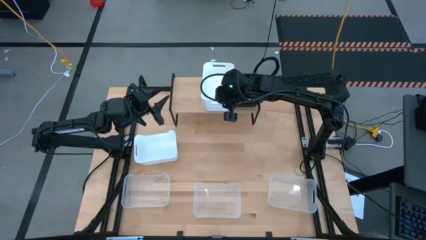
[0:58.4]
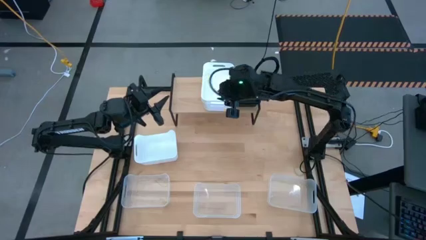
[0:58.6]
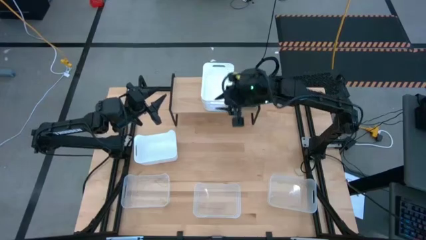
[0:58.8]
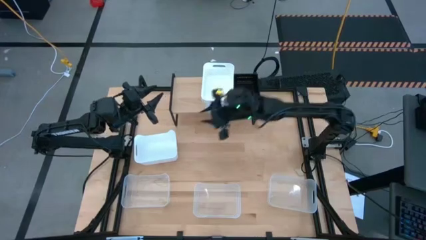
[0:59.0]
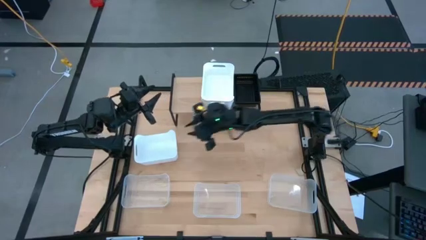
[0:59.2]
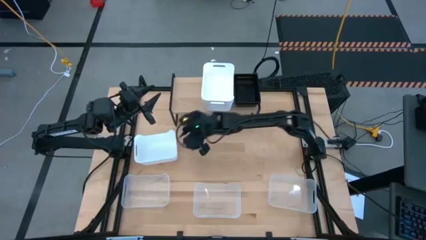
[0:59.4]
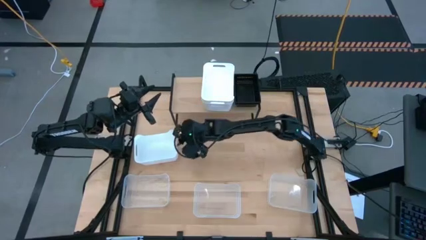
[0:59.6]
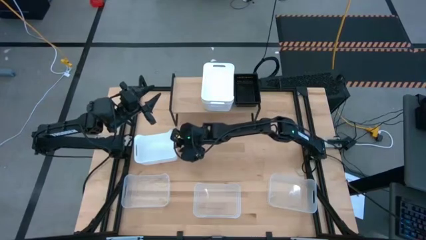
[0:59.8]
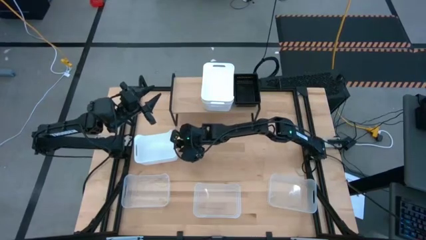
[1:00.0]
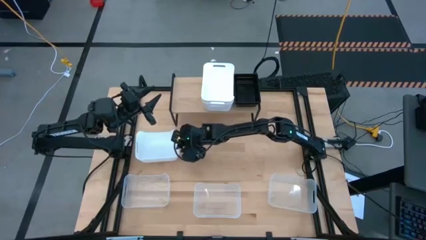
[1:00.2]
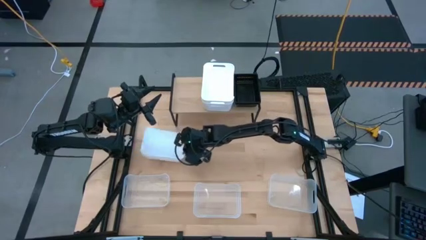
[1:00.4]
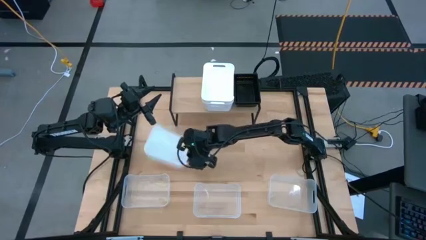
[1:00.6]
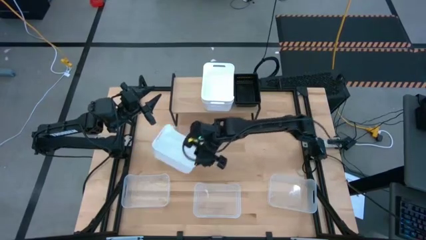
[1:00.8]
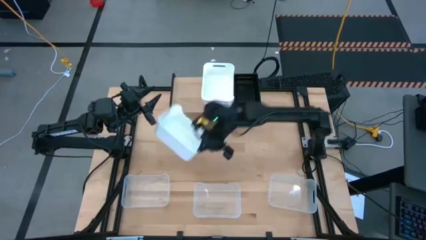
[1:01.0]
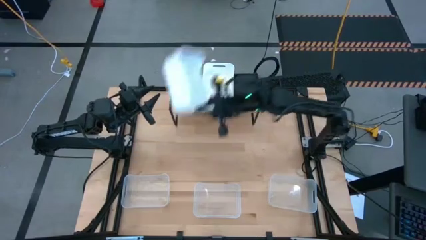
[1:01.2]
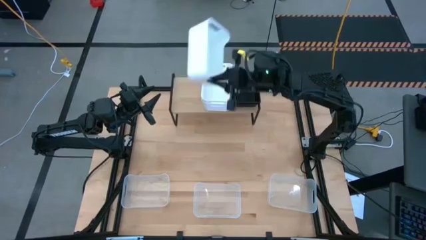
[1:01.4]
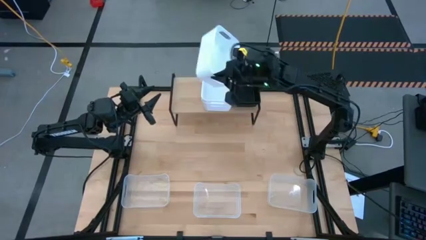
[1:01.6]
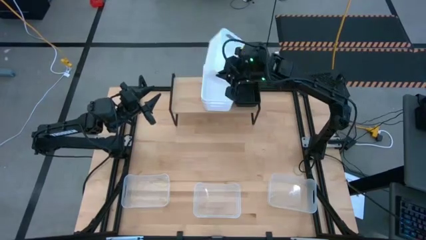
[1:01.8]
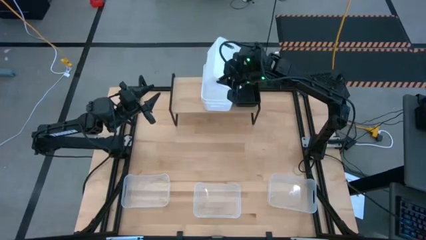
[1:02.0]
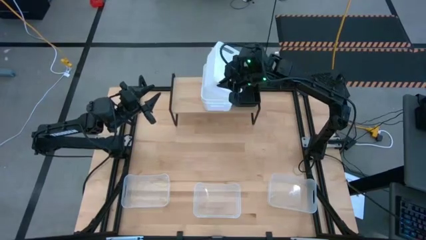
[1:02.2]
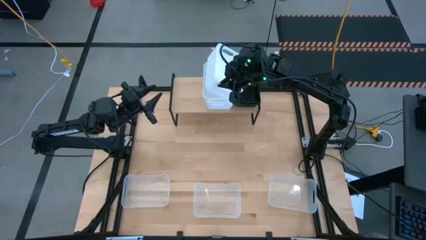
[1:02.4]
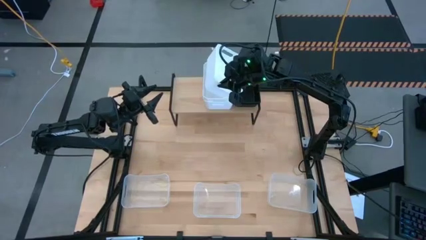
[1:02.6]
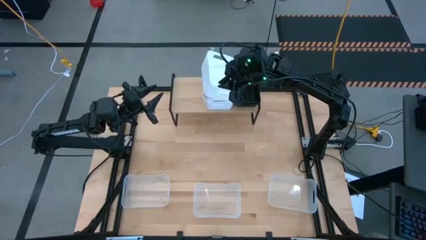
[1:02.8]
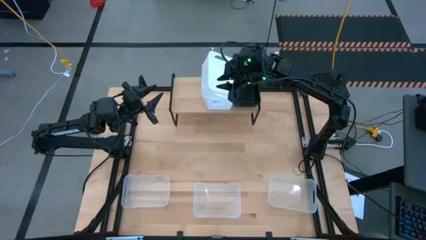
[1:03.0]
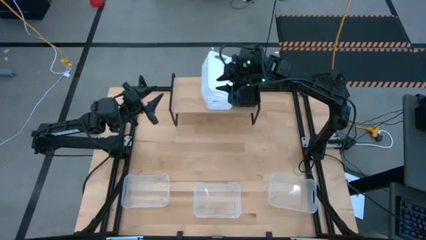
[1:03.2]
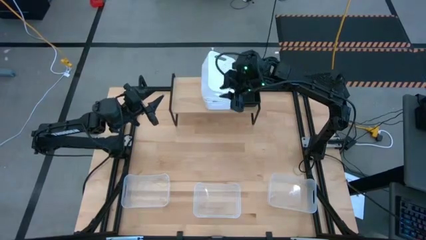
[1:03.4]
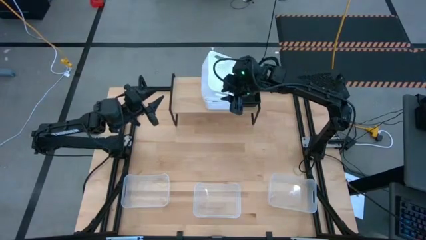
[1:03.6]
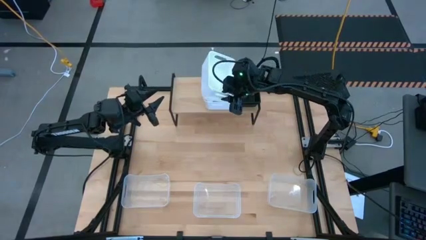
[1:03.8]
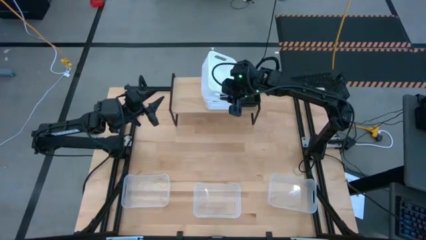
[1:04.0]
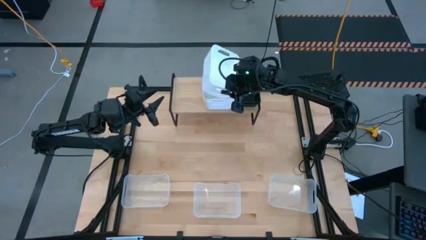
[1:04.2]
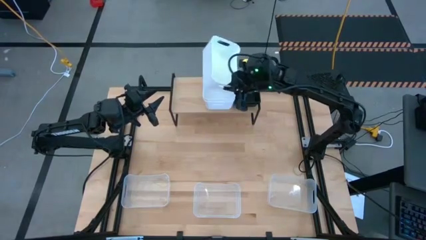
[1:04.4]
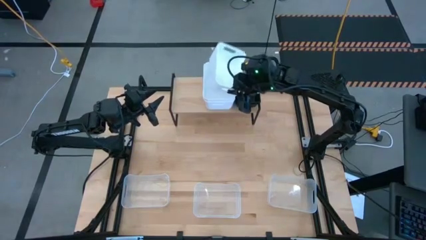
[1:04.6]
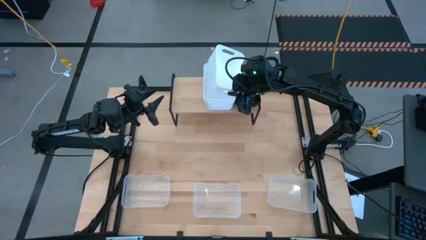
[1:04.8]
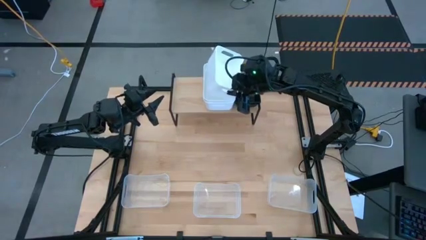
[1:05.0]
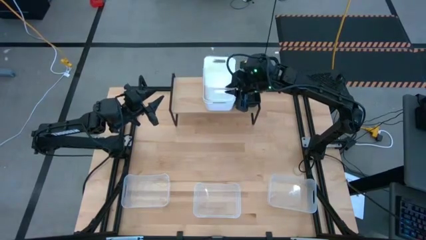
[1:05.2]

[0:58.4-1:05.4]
Task: Stack baskets on shelf by color
Stack the white bin on top of the stacked white bins on the shelf

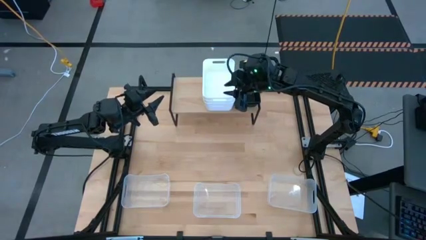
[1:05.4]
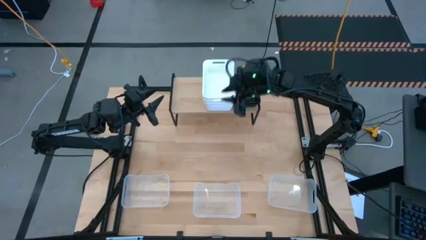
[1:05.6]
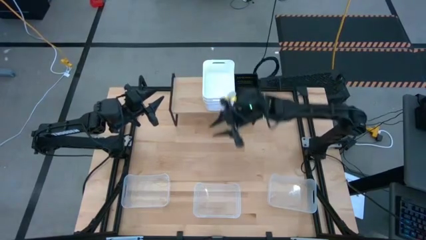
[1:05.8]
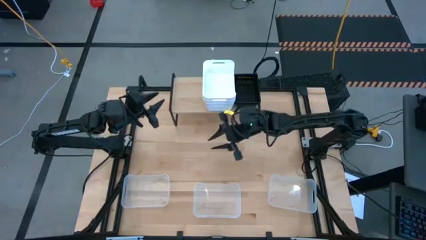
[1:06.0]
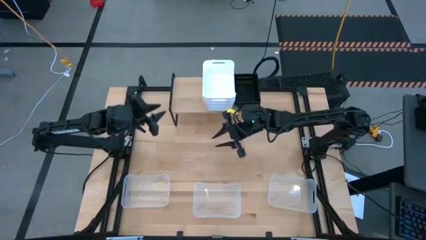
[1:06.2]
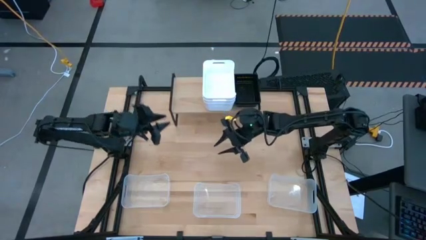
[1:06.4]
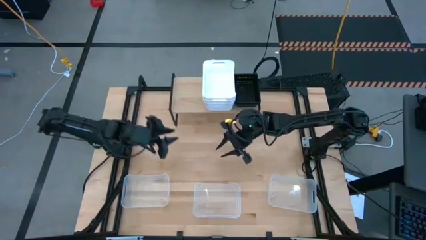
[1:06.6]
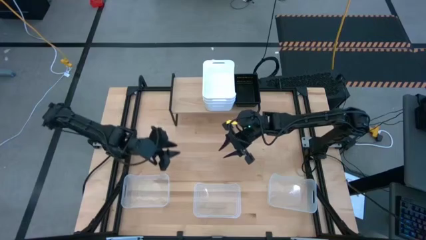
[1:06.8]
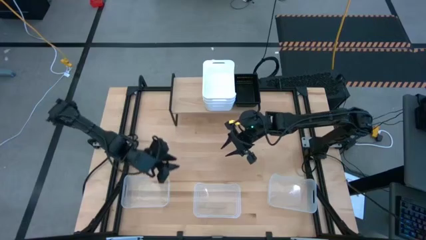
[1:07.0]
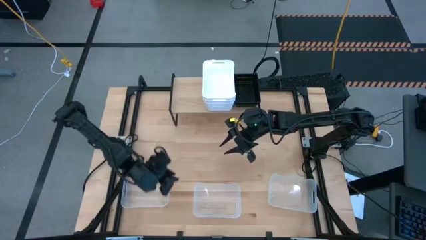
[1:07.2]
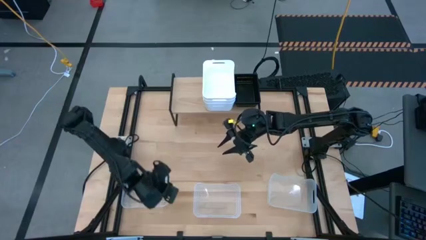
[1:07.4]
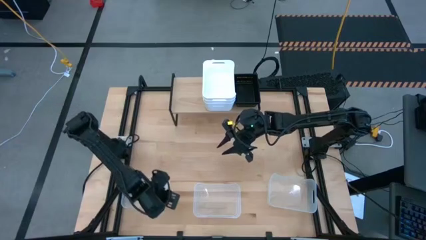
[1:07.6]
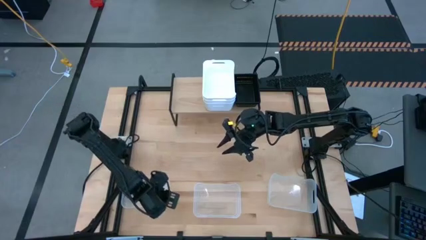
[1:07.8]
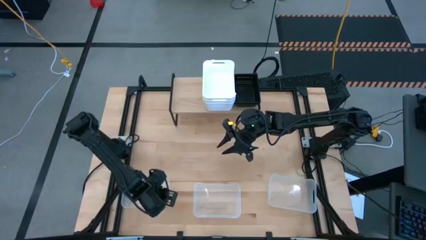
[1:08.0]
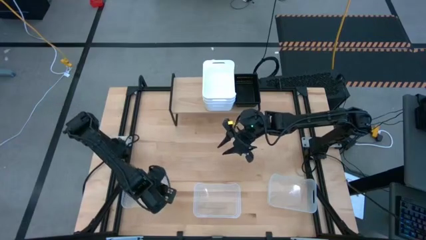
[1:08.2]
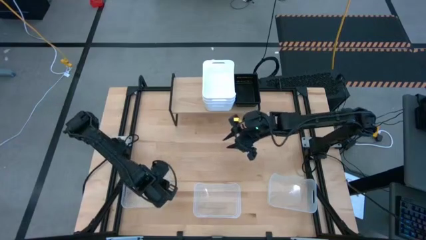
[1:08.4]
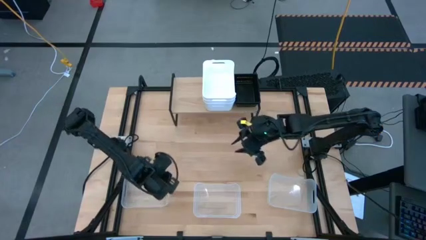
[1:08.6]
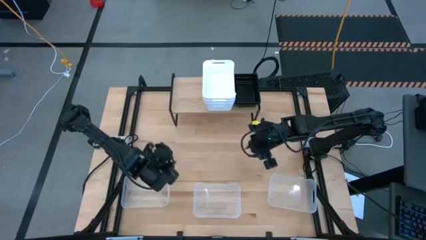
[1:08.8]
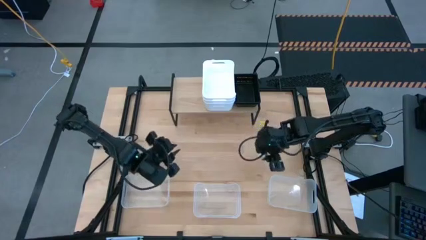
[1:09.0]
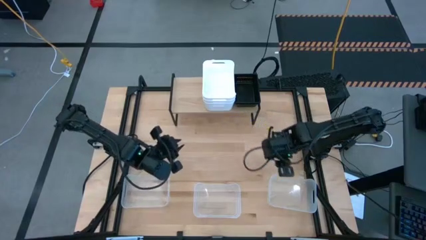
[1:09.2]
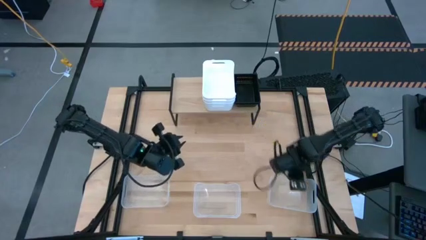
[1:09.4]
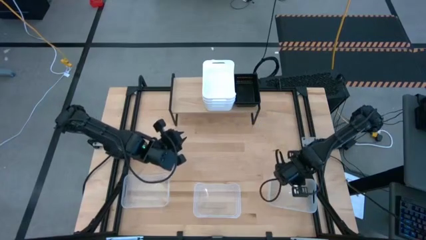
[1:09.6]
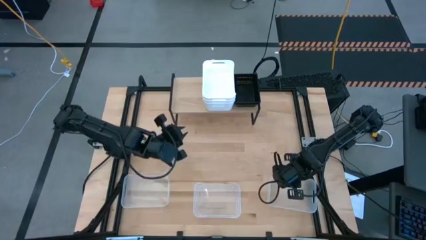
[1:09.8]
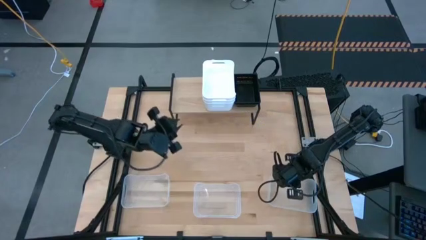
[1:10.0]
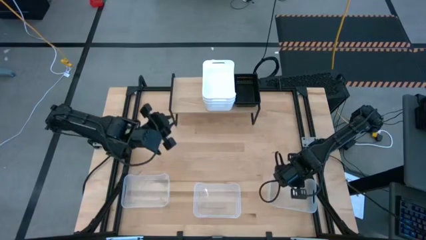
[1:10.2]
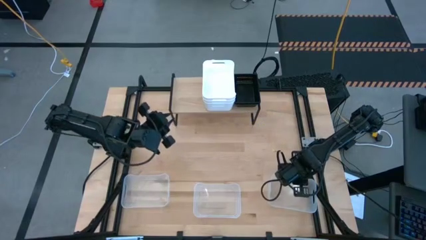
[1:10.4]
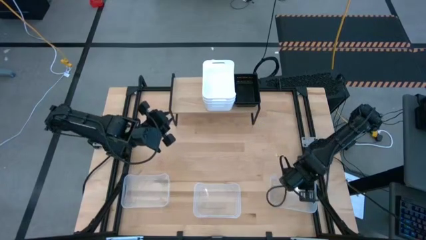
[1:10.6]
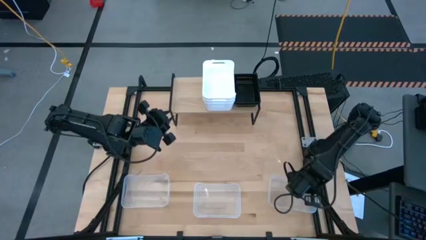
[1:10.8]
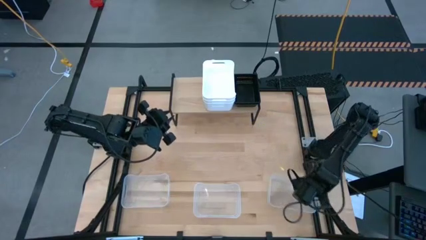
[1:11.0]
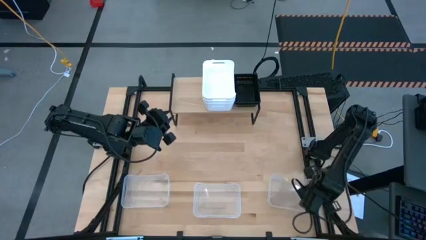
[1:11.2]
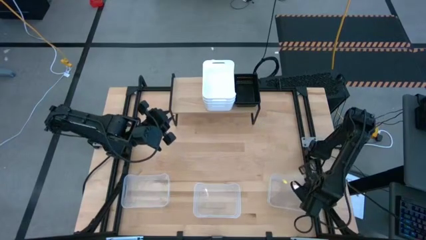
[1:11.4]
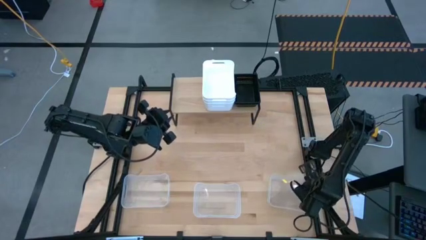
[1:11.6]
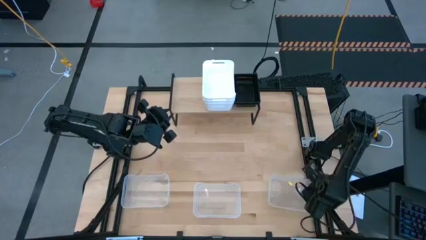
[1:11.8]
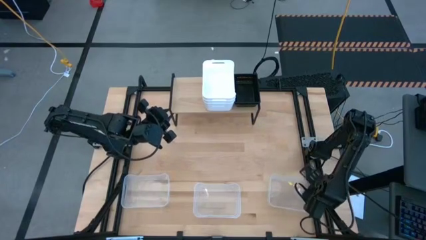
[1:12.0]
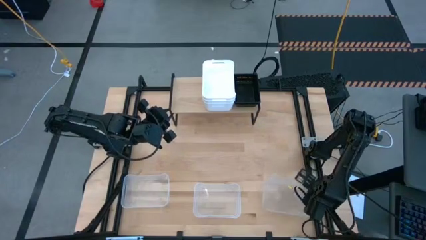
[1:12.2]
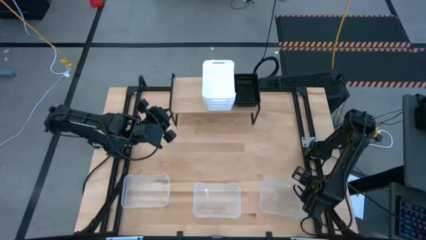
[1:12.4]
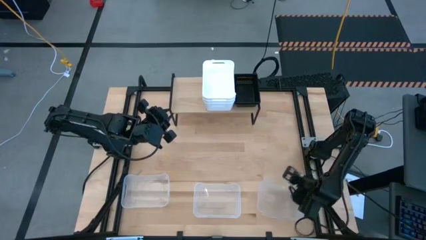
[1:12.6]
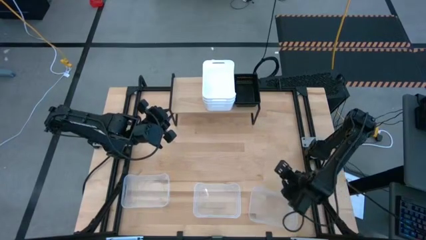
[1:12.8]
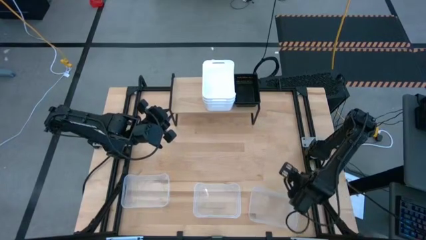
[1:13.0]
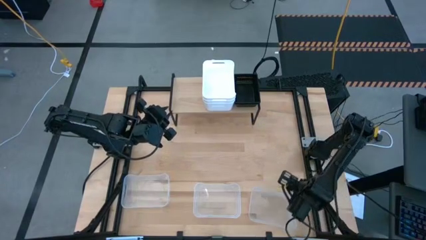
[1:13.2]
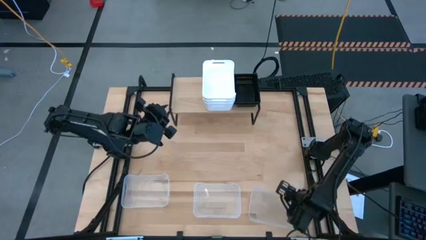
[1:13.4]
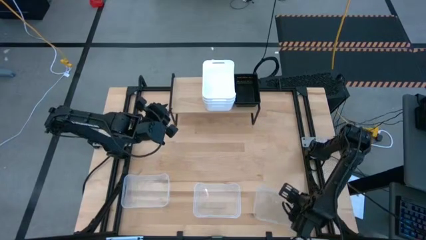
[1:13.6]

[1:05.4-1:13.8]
Put the right transparent bin on the shelf

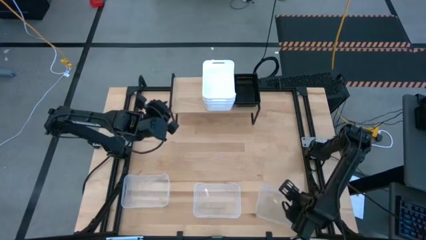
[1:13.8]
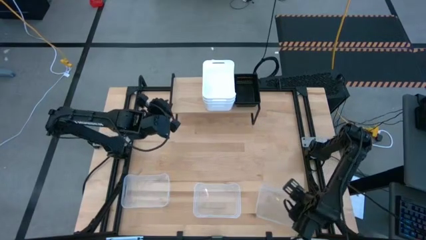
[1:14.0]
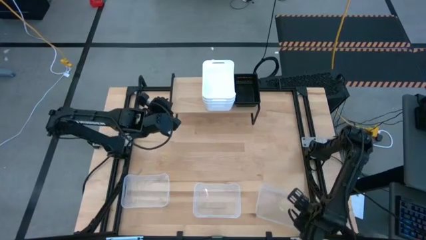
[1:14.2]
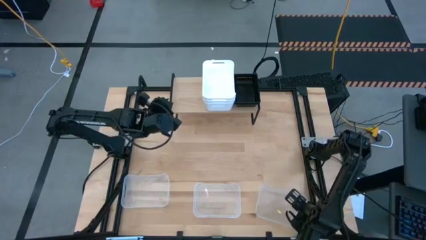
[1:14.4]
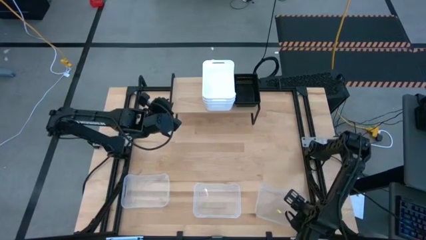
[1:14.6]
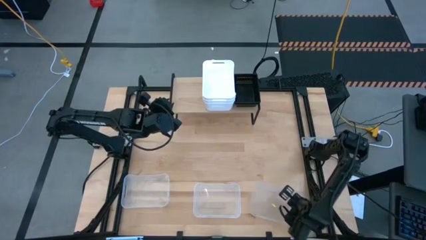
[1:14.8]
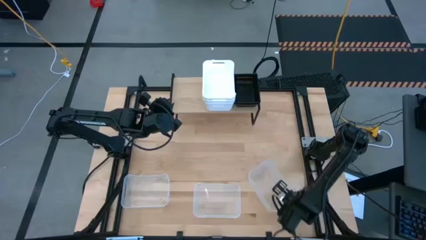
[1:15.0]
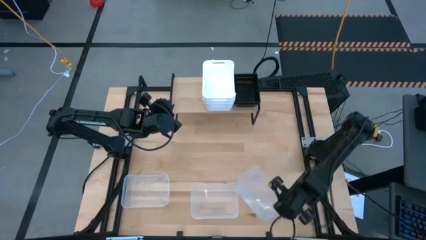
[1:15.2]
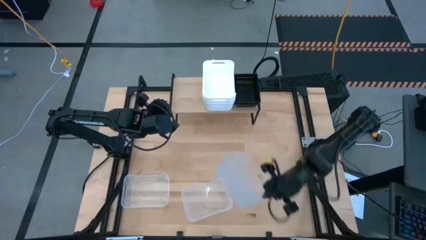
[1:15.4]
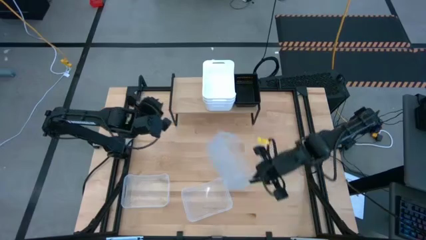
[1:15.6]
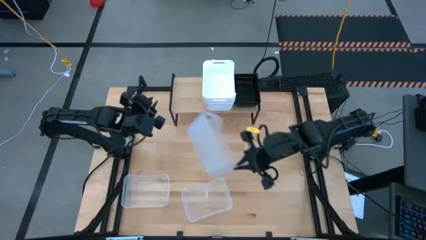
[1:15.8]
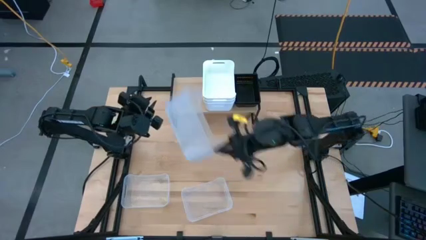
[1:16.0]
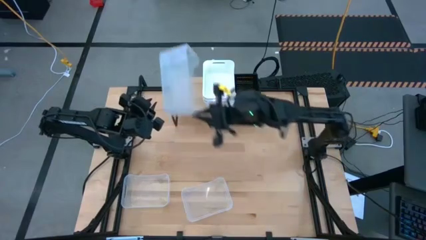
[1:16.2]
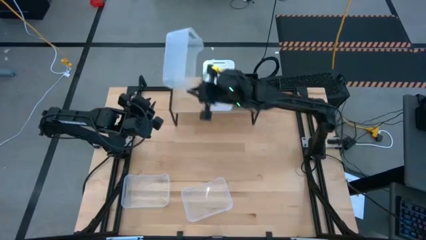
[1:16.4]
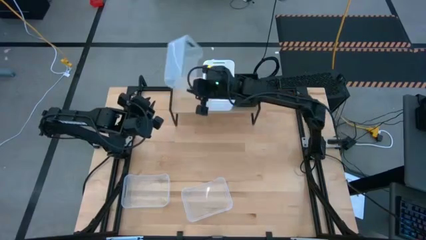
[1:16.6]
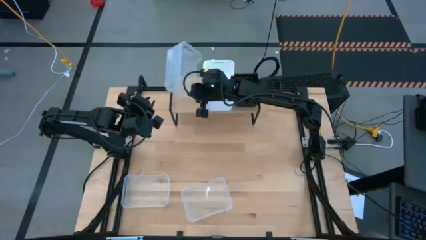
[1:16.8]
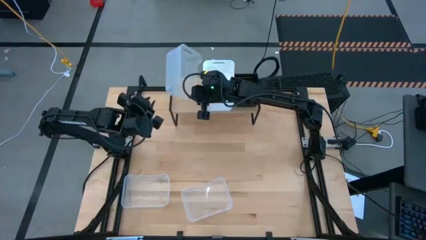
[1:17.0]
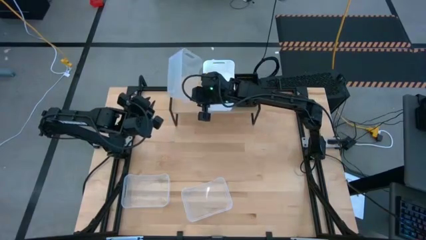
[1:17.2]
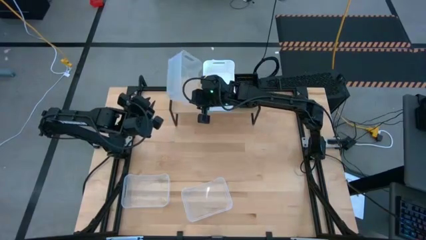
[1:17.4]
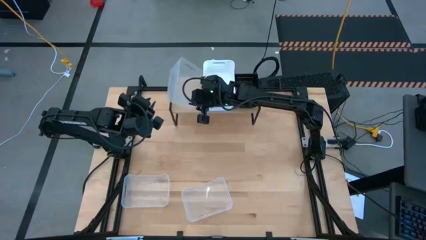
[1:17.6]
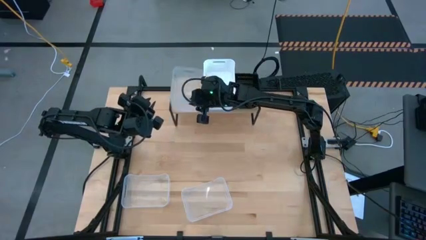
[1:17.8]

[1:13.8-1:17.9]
Put the right transparent bin on the shelf
